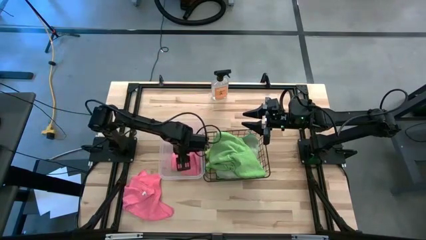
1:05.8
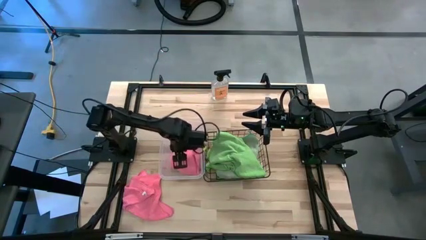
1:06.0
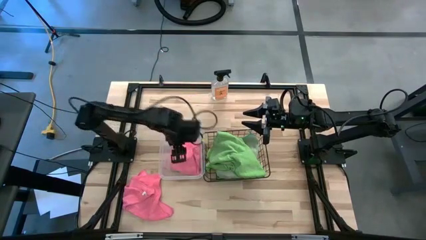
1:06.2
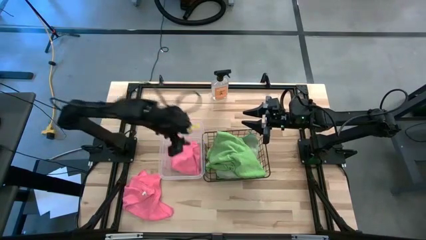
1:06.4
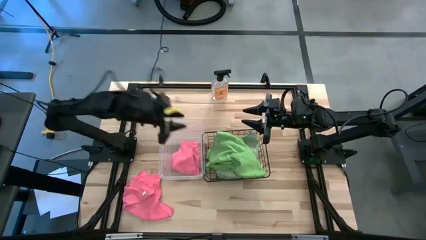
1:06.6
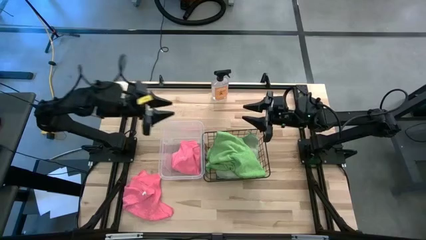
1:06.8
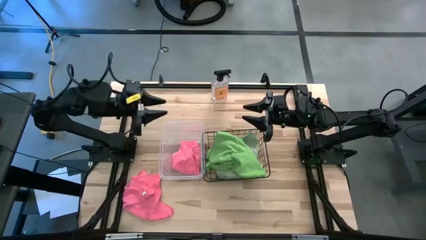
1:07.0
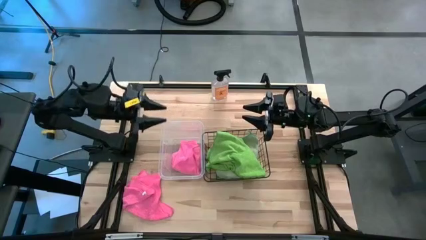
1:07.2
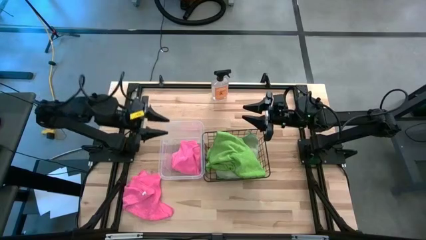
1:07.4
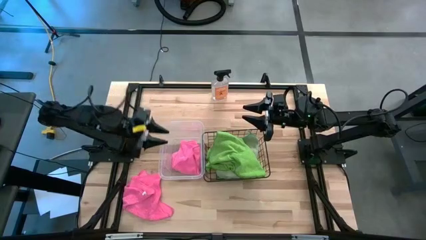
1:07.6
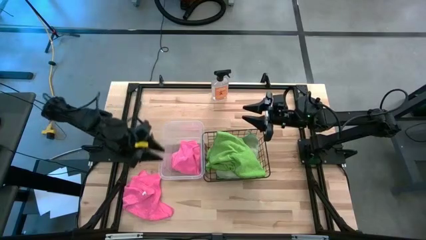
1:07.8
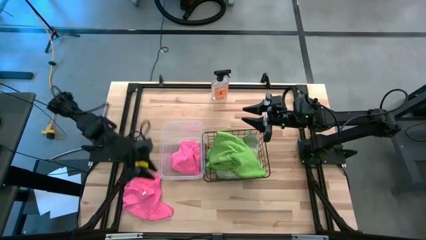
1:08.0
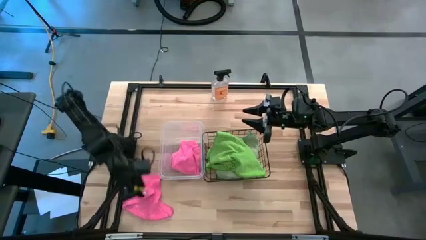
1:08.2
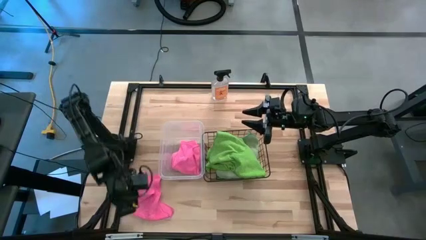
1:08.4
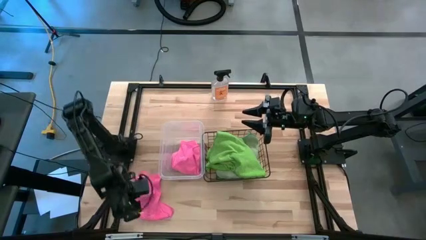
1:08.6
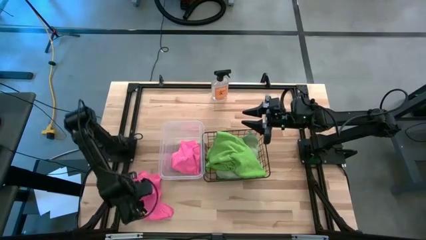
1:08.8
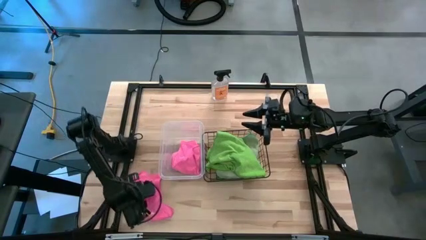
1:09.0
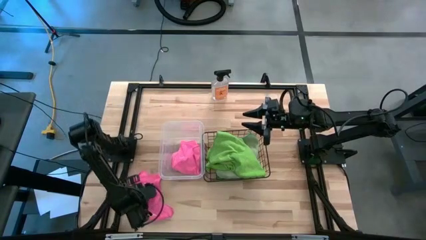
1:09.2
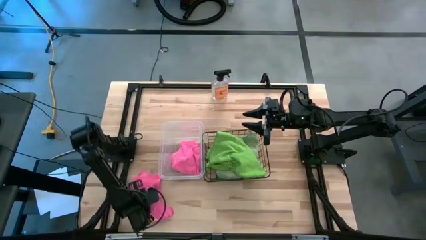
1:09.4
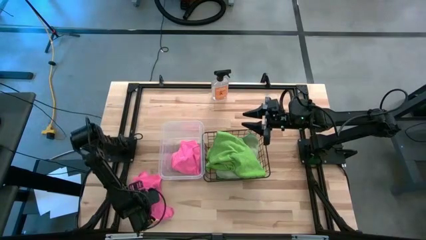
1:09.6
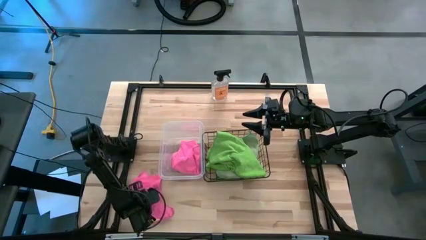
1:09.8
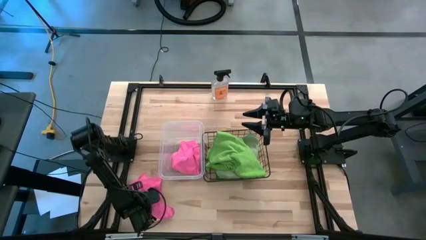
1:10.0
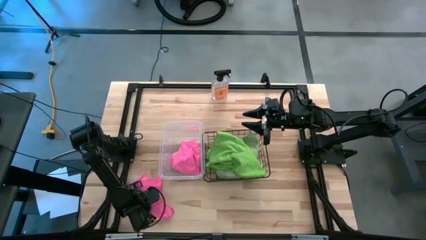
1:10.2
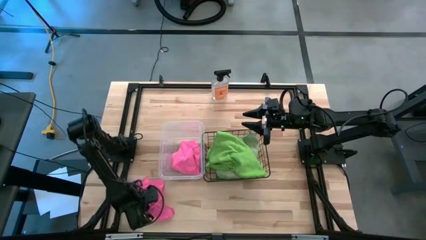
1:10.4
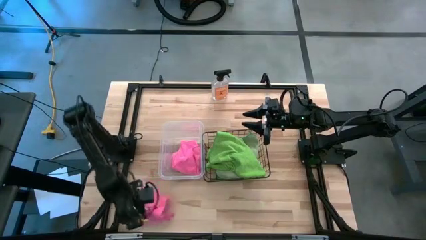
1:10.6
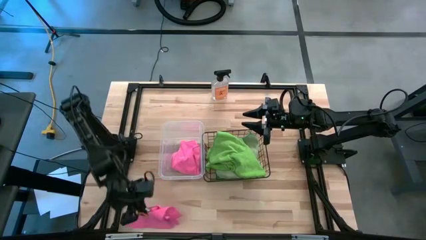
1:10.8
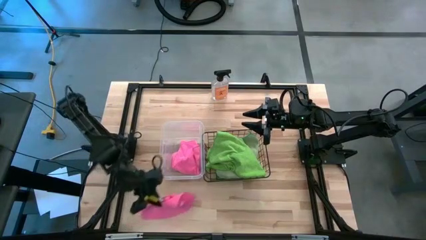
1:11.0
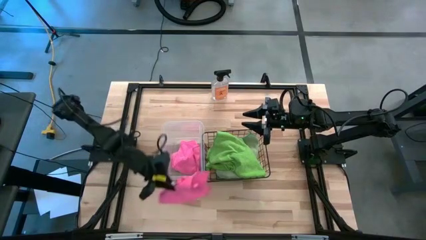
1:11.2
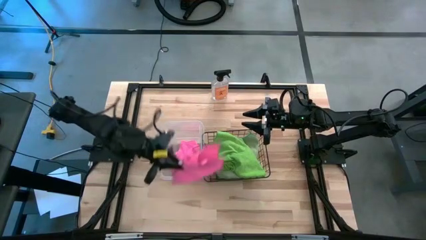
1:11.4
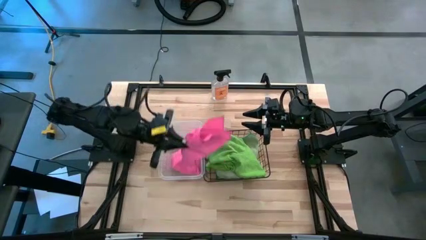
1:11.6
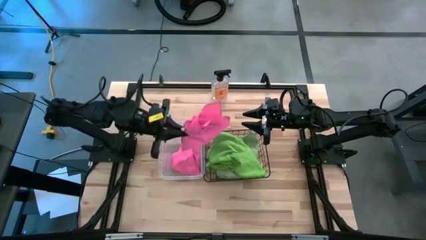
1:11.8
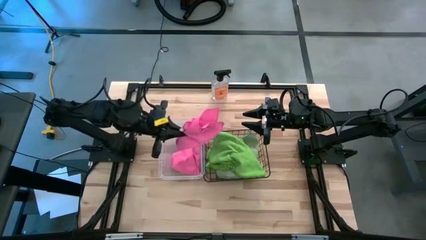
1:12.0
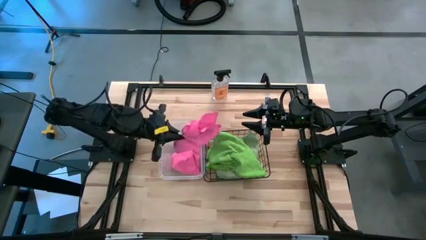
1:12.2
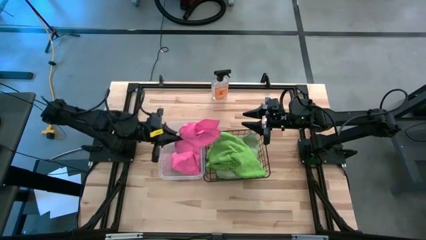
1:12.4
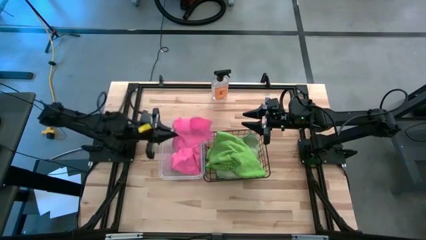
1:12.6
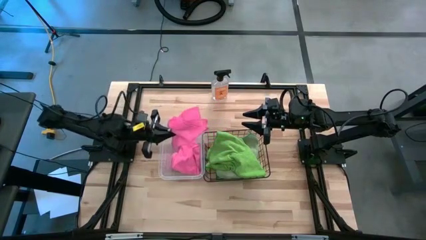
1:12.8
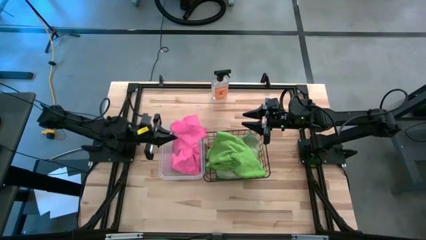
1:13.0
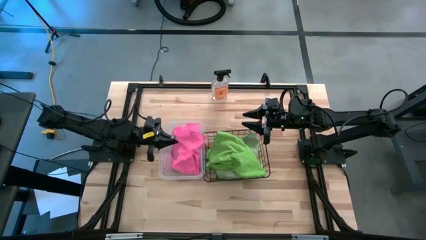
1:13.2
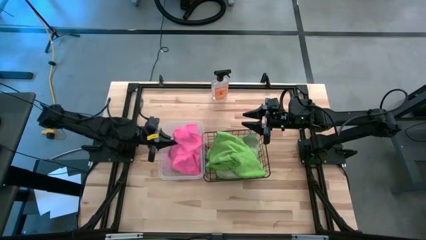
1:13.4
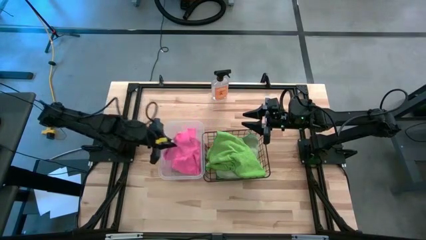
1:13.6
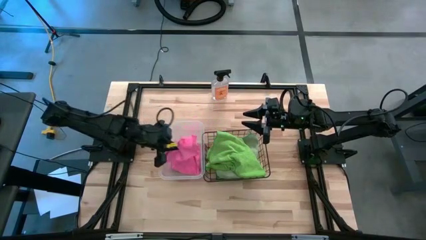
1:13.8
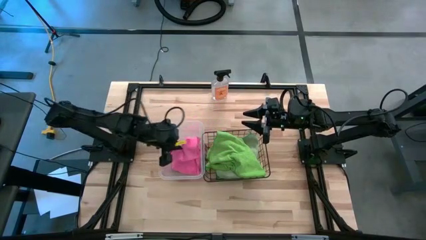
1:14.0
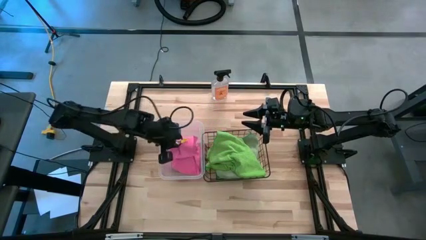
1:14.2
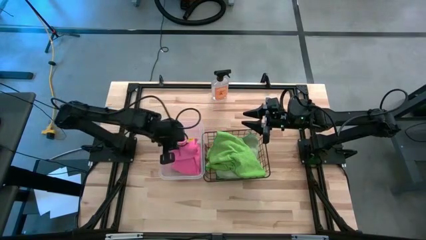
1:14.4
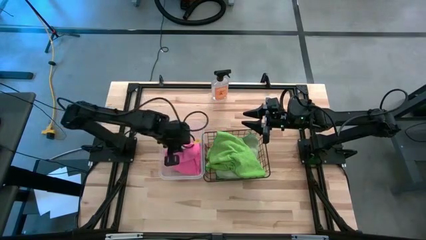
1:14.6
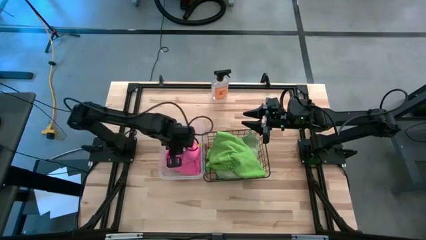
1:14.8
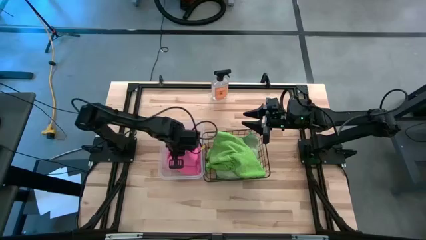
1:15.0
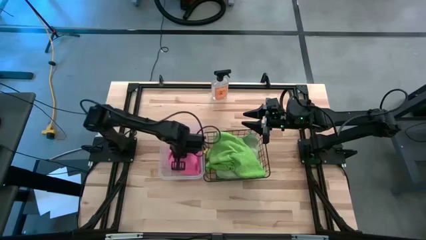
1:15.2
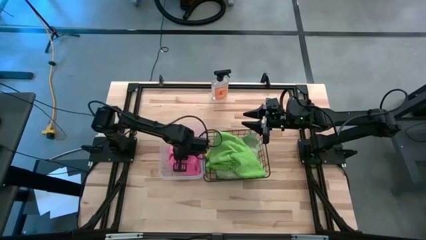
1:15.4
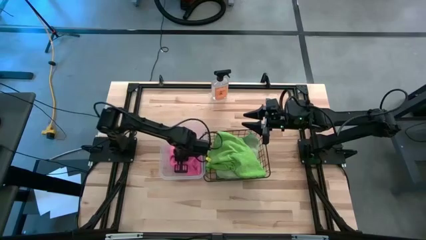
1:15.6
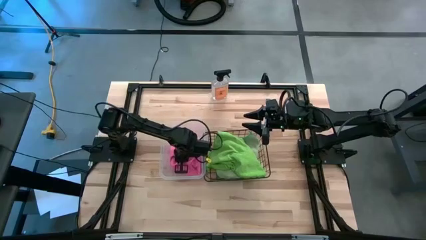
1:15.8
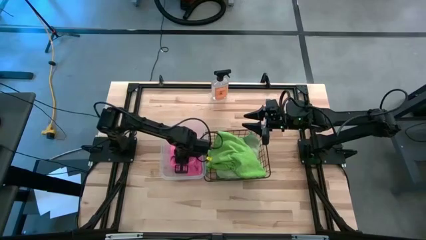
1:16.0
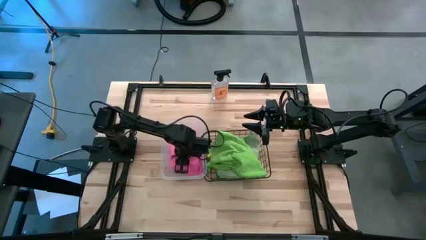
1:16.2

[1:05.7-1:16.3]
Task: Sort microfiber towel by color & place in baskets
Put the pink towel into the transparent bin

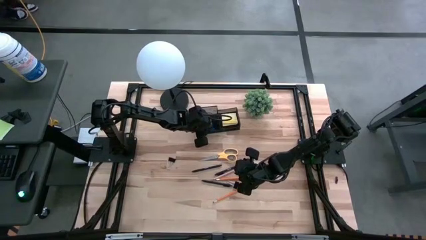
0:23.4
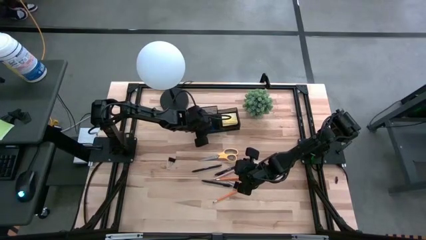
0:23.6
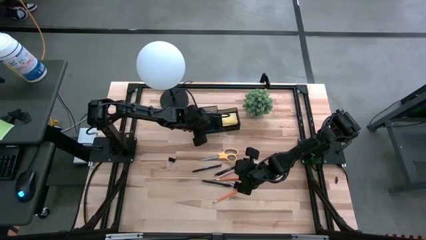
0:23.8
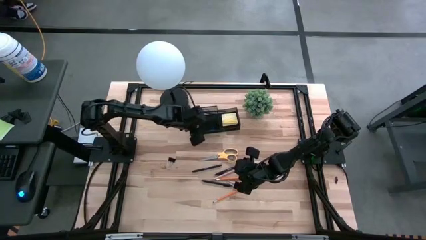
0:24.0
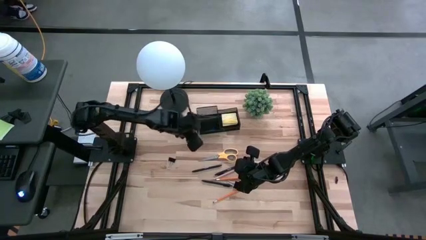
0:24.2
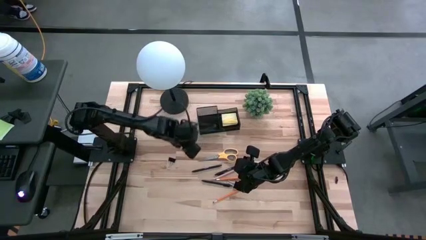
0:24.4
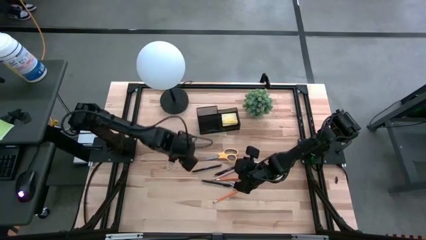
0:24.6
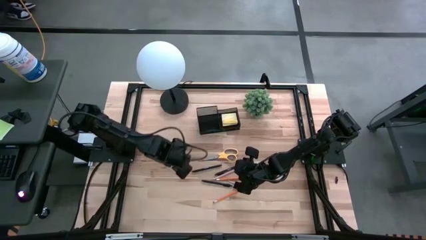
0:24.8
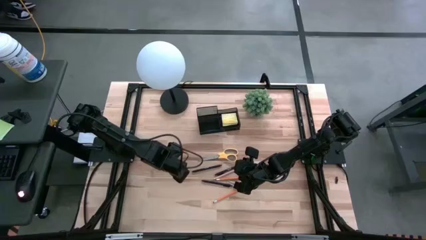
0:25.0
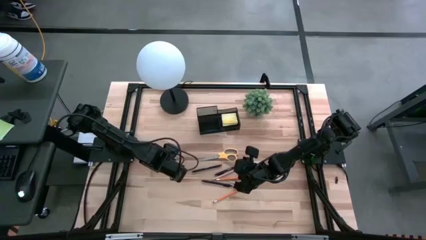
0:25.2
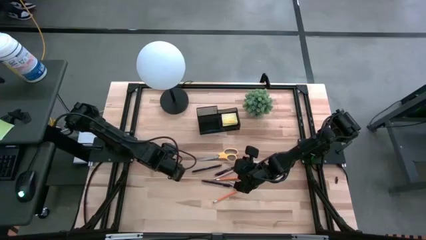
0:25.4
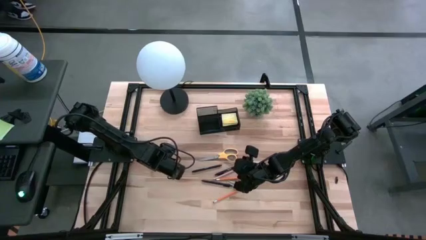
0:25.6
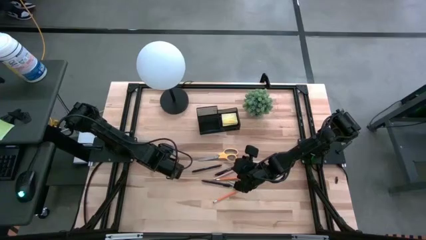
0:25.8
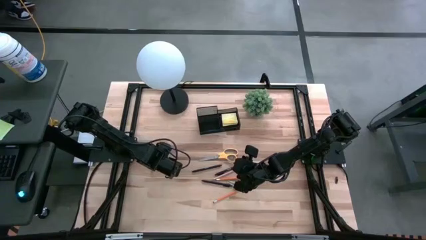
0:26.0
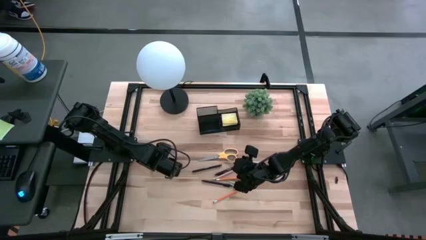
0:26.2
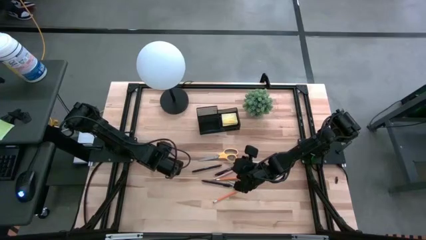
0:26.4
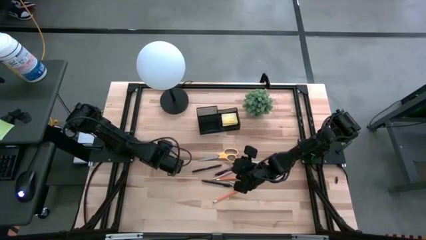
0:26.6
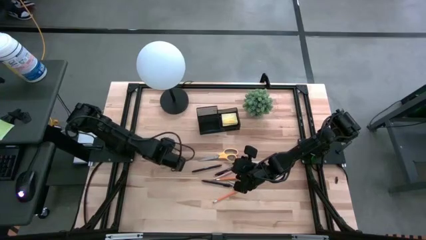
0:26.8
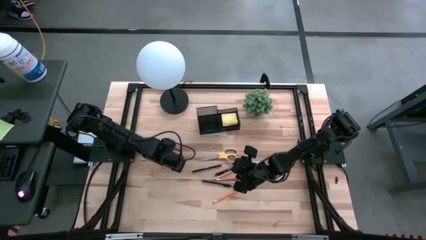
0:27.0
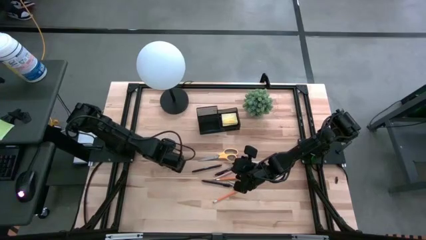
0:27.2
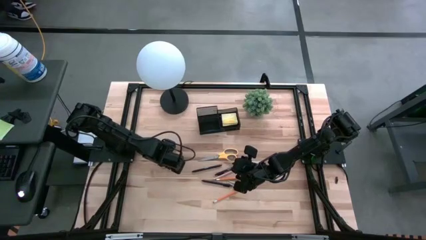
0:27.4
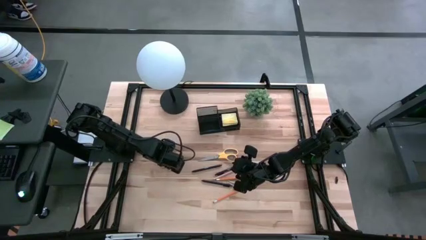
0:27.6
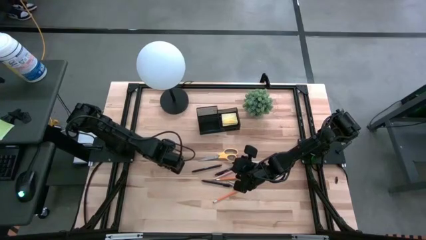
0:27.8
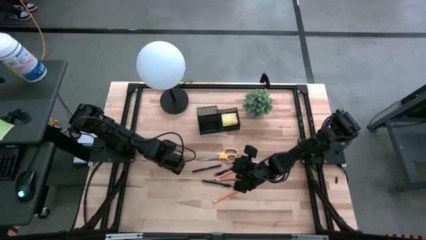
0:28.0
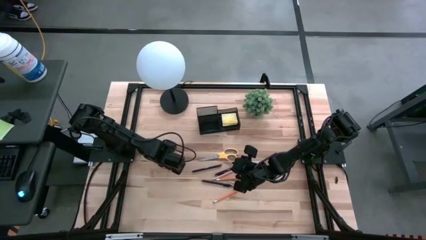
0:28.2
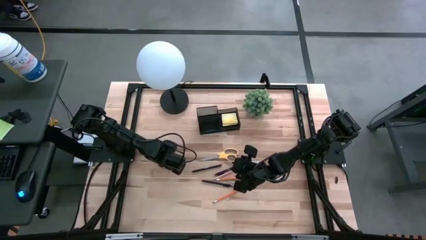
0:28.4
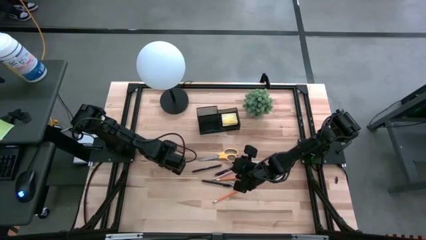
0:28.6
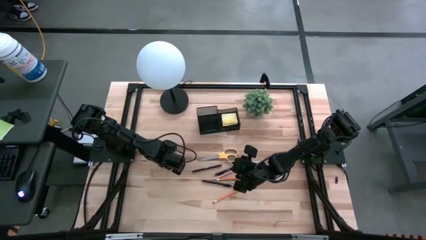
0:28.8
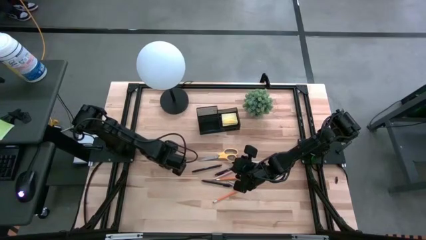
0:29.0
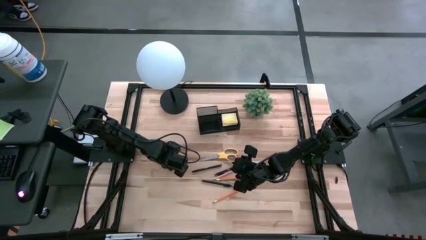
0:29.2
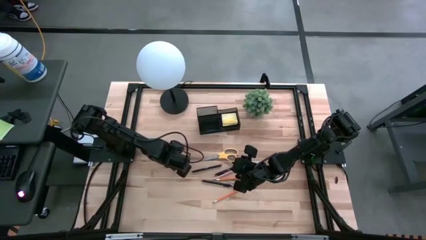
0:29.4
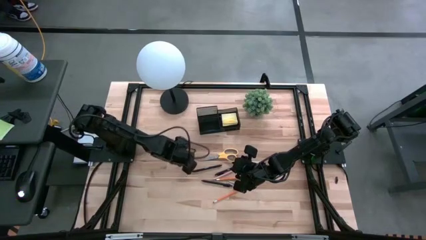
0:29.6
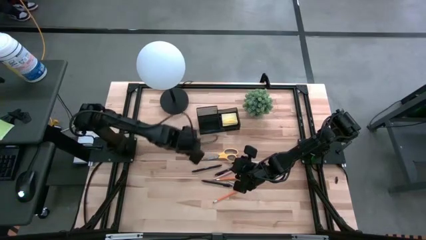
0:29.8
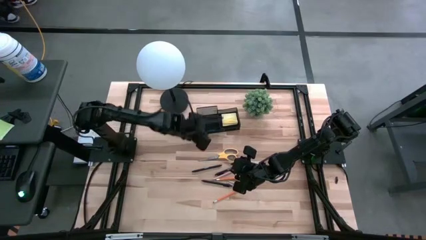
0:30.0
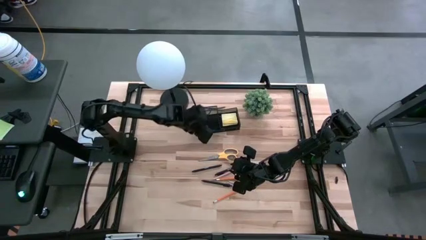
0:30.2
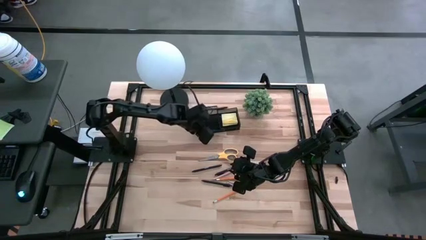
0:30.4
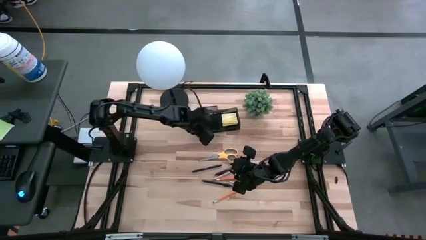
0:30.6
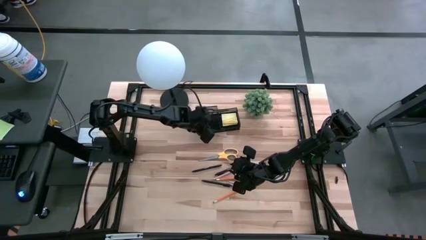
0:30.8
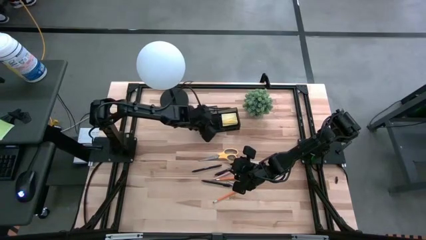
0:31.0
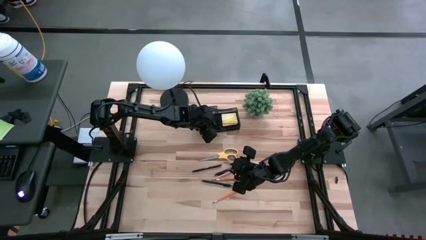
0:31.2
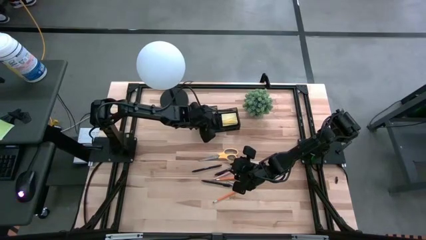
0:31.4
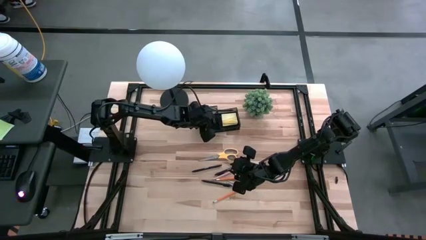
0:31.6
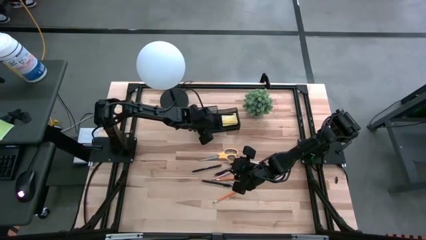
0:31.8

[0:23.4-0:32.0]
Task: Pick and place office supplies into organizer
Put the left black binder clip into the desk organizer
